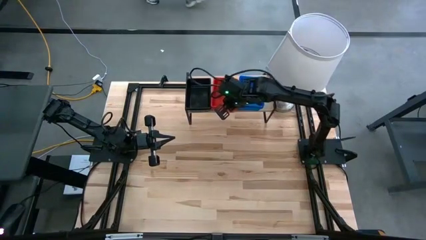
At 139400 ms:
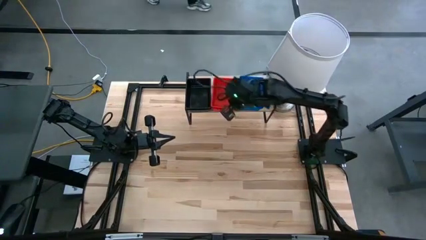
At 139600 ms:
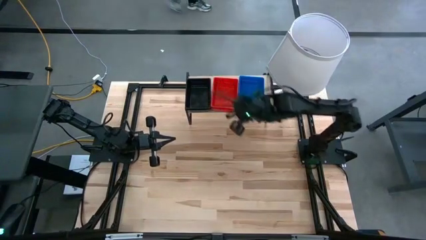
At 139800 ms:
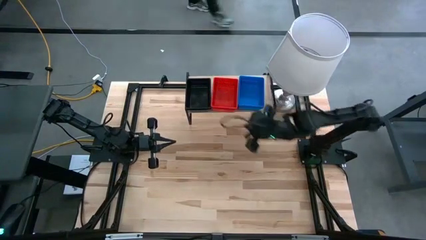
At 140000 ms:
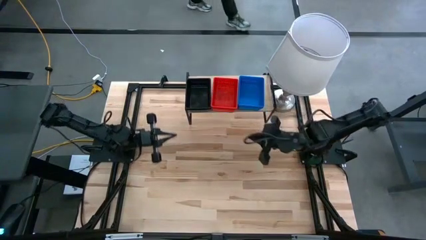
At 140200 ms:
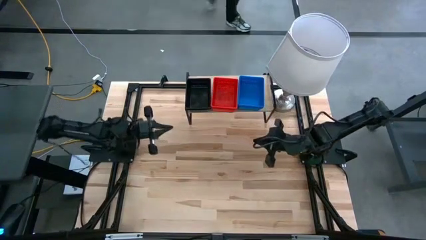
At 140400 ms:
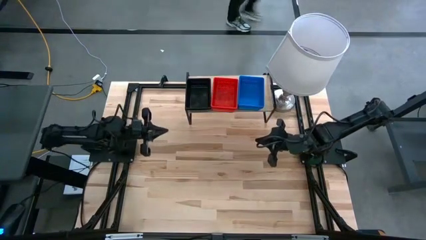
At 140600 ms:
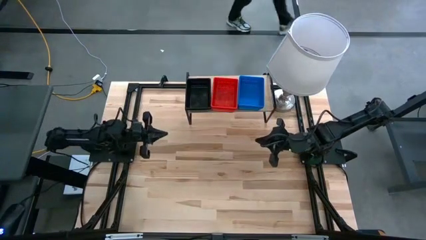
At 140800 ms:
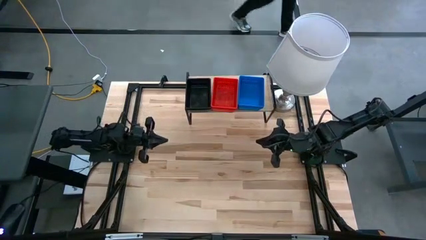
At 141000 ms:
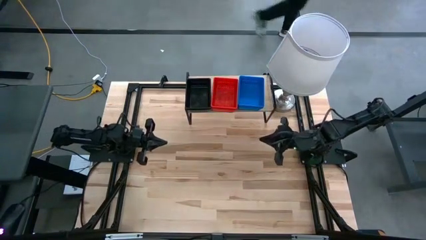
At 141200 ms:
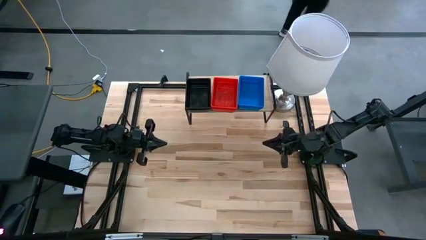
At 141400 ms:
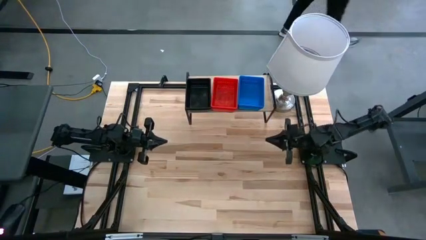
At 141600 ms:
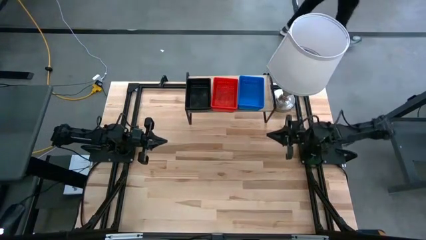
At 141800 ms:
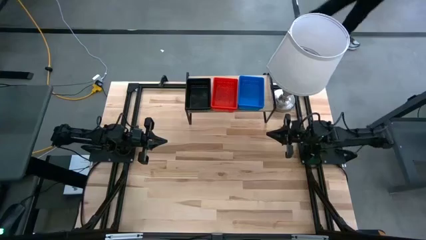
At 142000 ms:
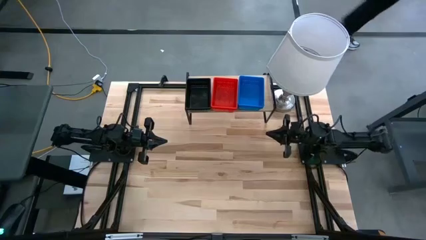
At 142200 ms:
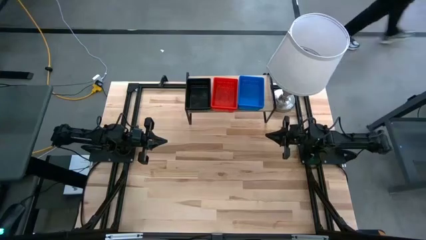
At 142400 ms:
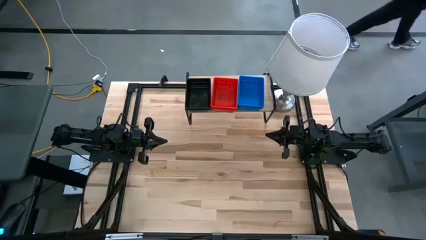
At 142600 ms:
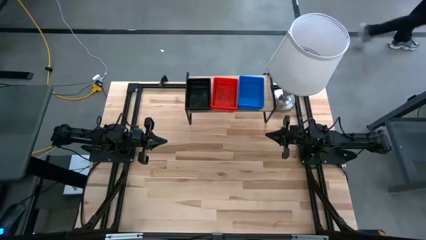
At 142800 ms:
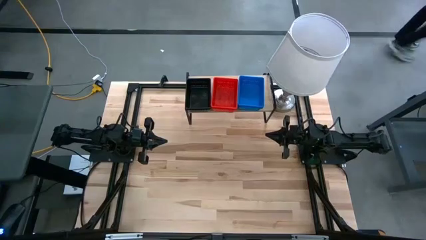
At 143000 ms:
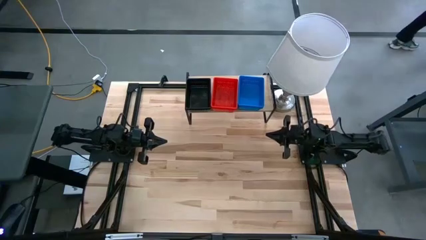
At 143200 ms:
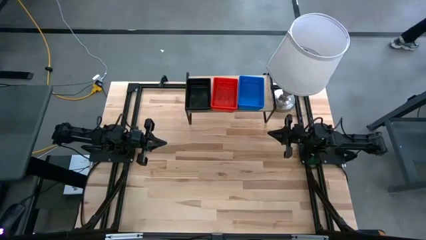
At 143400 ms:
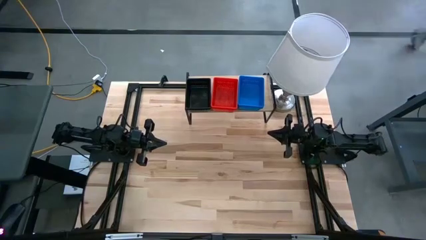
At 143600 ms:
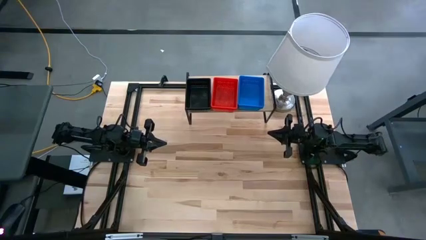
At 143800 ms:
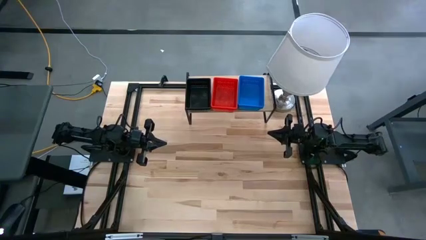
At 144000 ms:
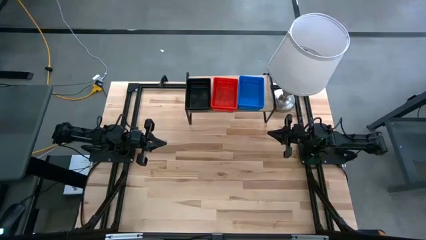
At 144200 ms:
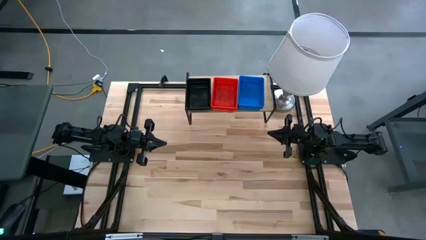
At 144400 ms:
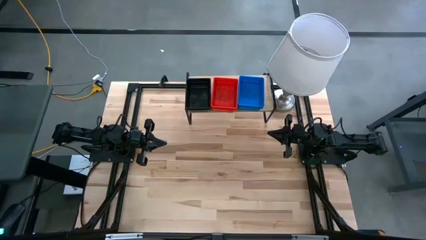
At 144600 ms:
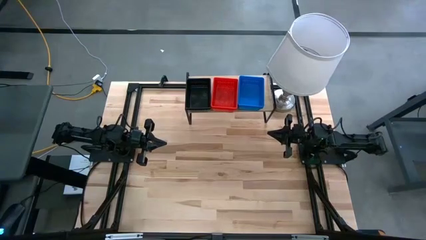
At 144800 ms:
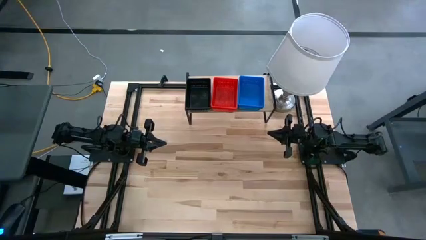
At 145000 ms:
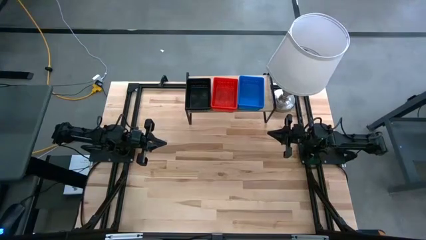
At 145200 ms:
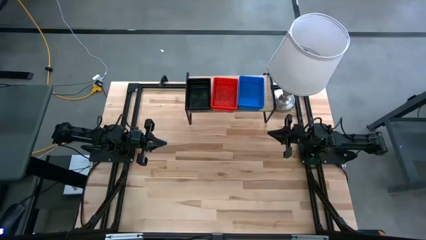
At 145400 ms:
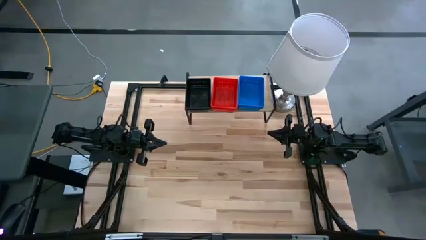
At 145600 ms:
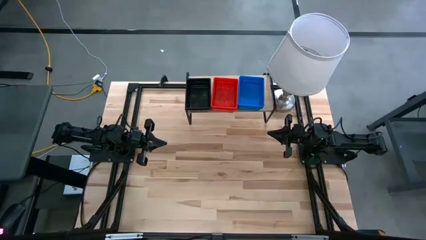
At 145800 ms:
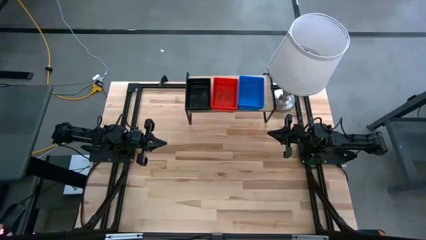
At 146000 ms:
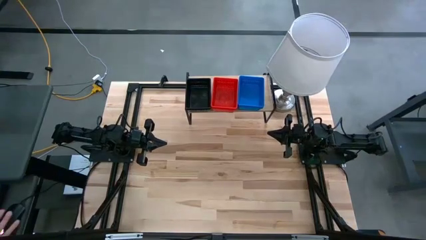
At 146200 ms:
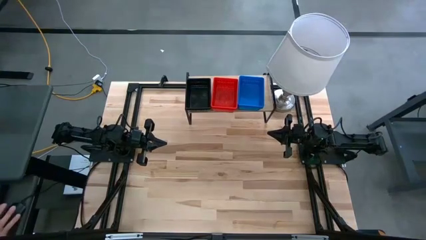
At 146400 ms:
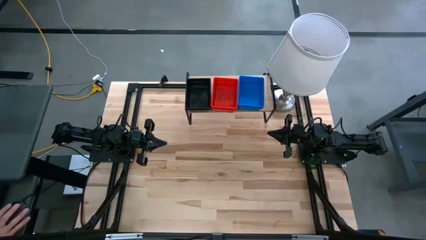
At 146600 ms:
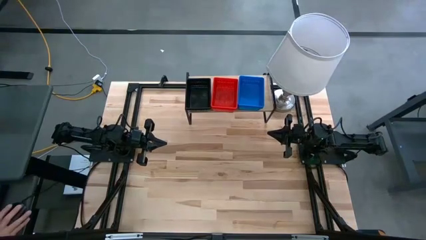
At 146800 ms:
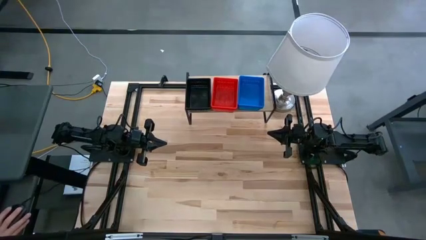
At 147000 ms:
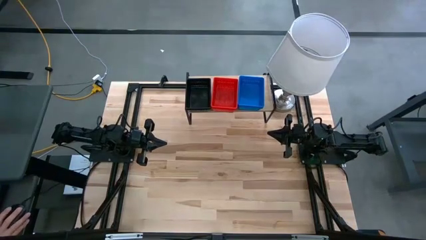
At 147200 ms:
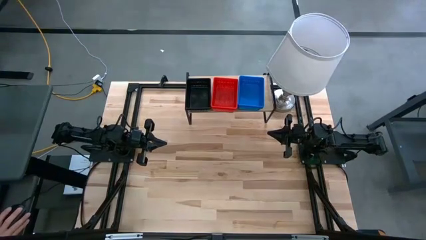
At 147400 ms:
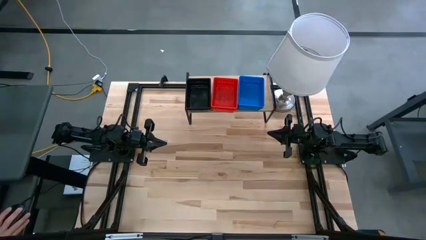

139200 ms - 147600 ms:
Task: Stack baskets on shelf by color
Return to Home Position

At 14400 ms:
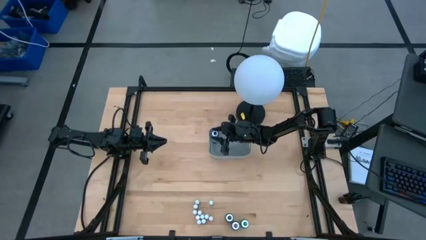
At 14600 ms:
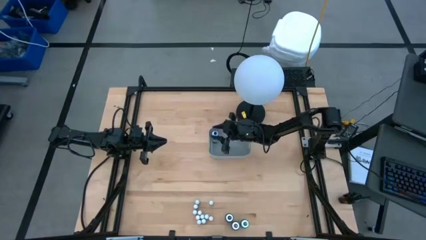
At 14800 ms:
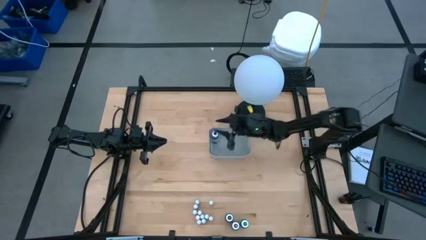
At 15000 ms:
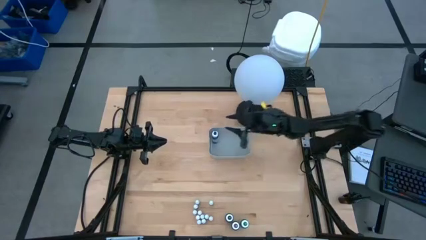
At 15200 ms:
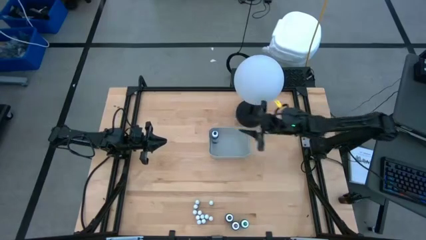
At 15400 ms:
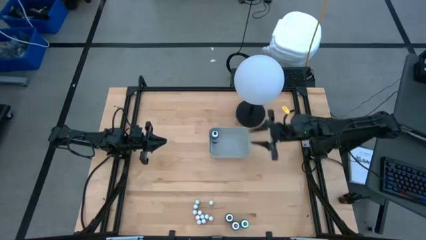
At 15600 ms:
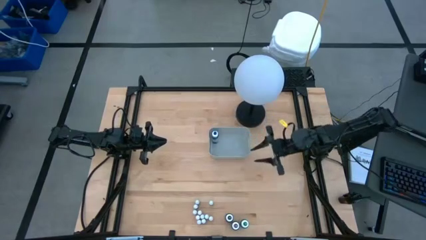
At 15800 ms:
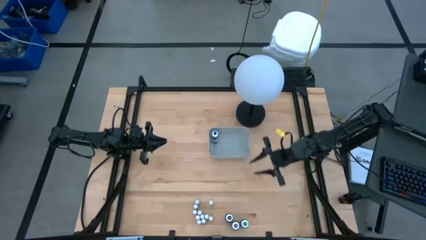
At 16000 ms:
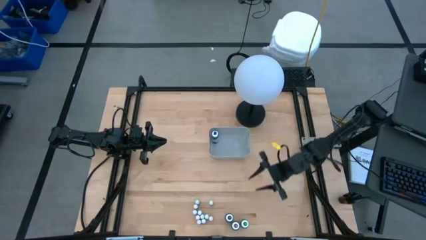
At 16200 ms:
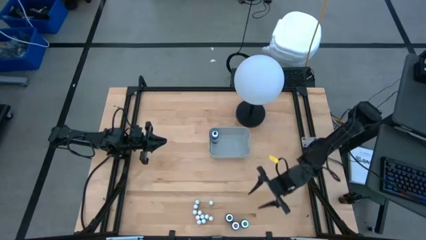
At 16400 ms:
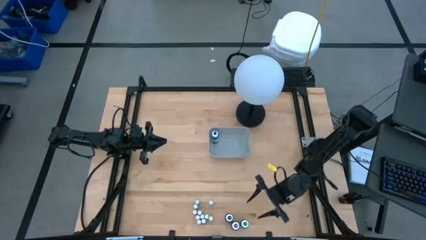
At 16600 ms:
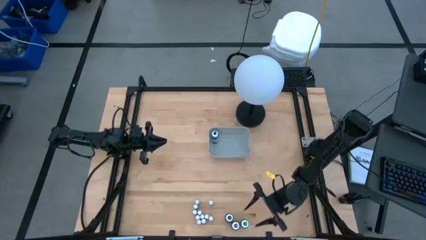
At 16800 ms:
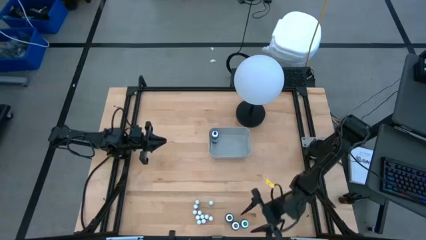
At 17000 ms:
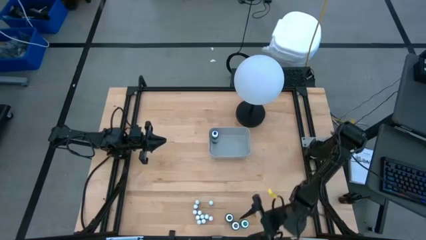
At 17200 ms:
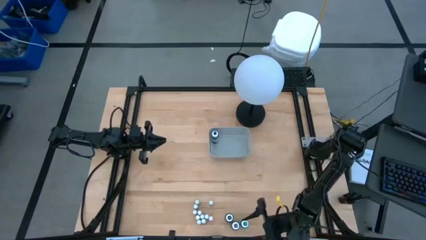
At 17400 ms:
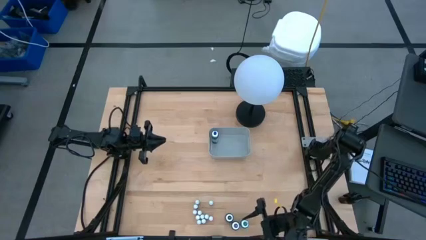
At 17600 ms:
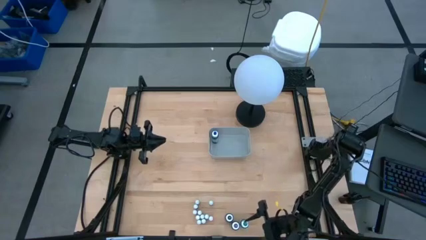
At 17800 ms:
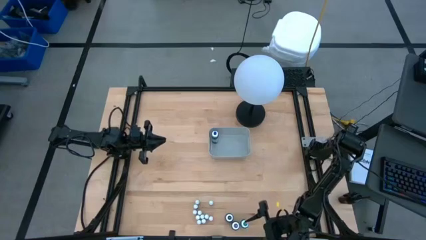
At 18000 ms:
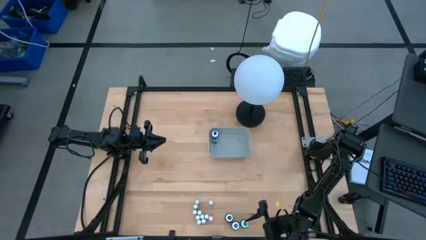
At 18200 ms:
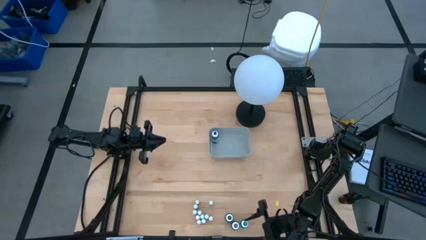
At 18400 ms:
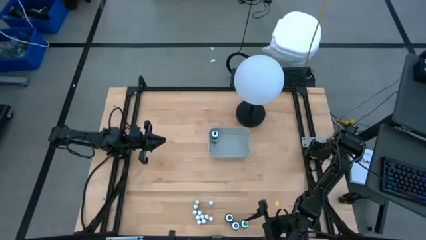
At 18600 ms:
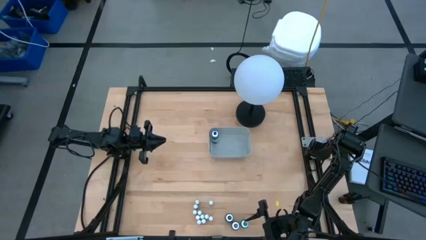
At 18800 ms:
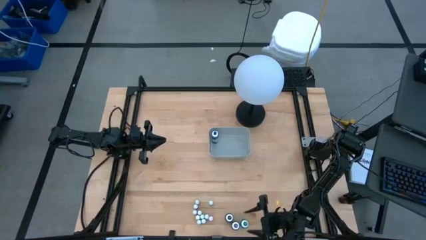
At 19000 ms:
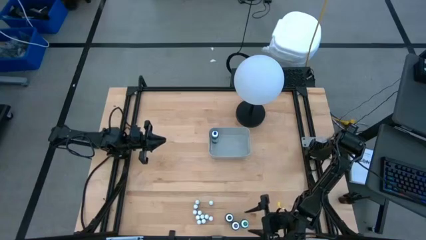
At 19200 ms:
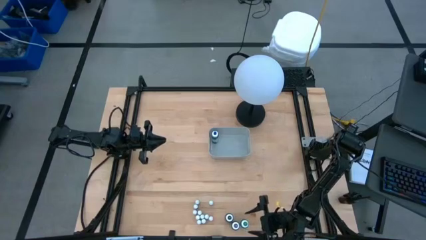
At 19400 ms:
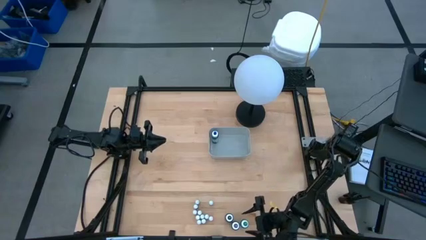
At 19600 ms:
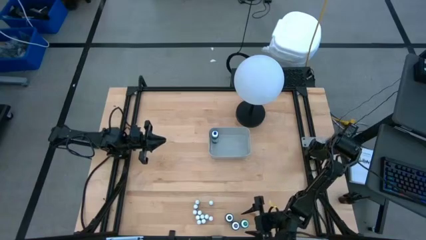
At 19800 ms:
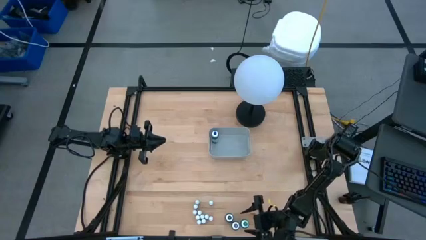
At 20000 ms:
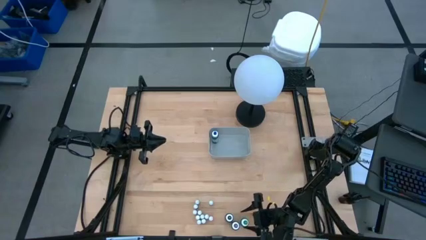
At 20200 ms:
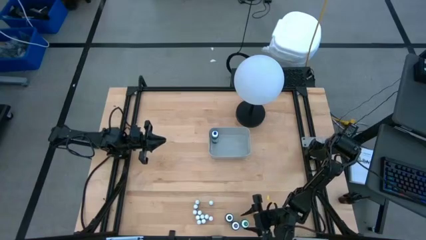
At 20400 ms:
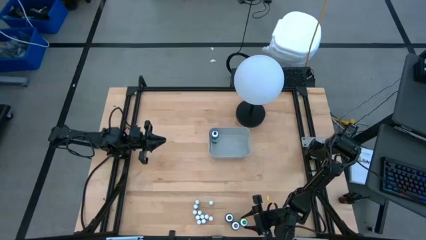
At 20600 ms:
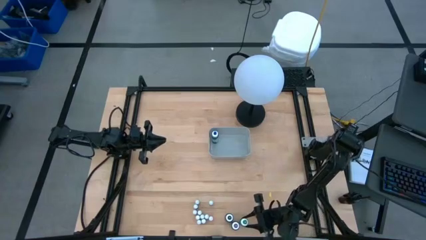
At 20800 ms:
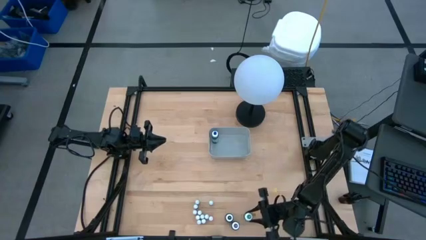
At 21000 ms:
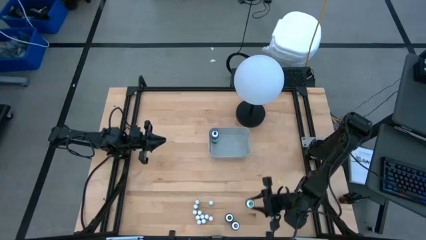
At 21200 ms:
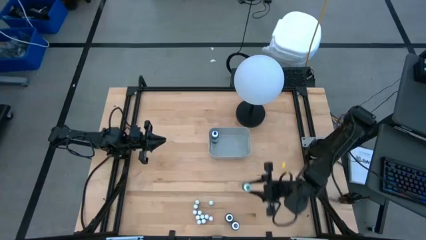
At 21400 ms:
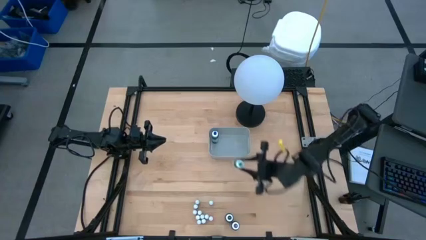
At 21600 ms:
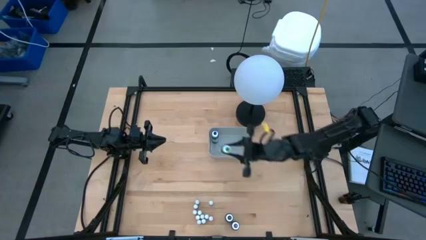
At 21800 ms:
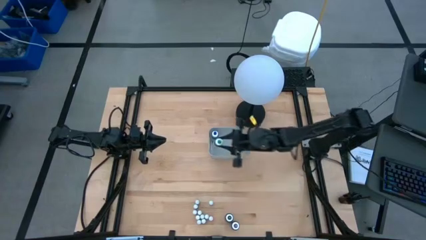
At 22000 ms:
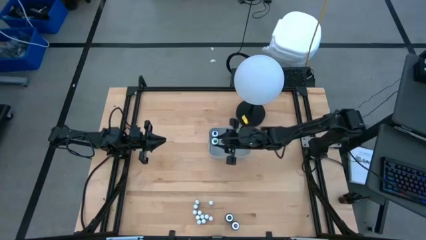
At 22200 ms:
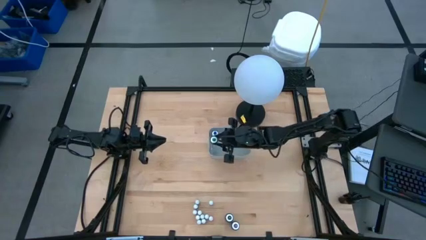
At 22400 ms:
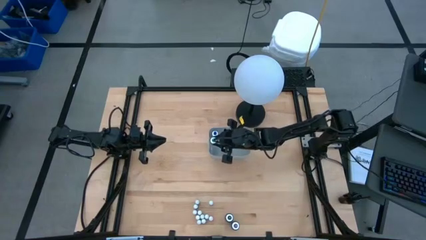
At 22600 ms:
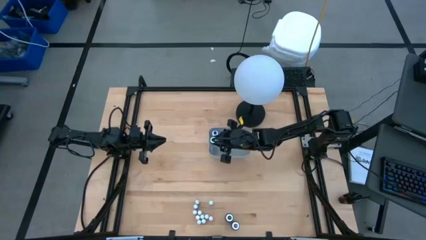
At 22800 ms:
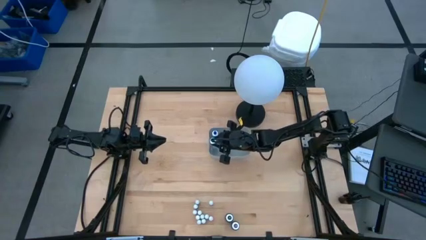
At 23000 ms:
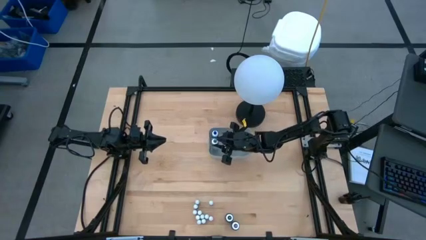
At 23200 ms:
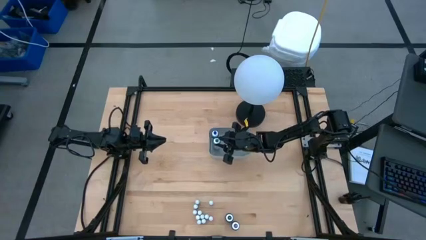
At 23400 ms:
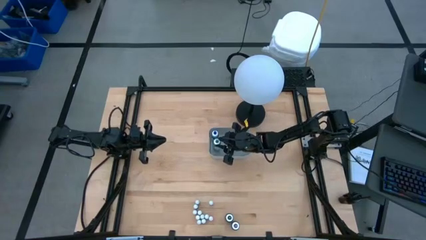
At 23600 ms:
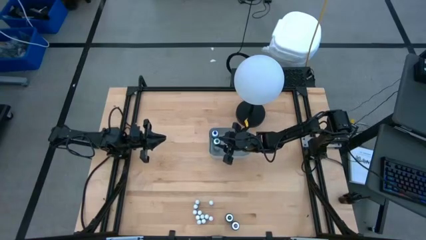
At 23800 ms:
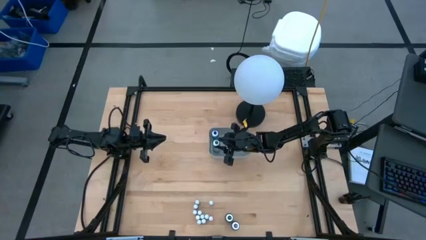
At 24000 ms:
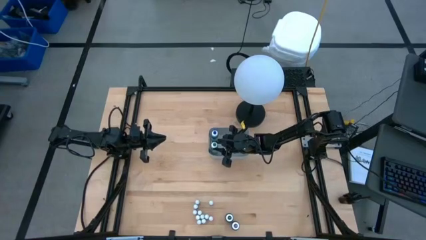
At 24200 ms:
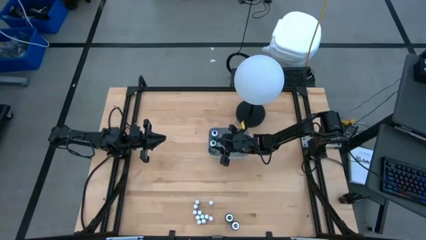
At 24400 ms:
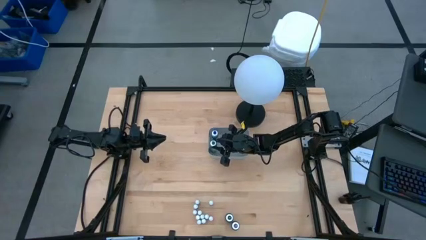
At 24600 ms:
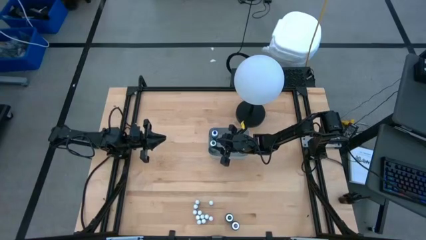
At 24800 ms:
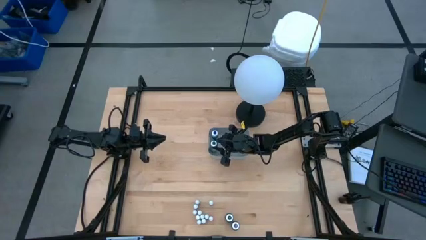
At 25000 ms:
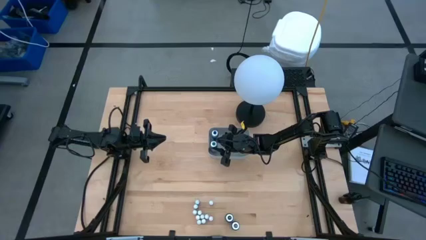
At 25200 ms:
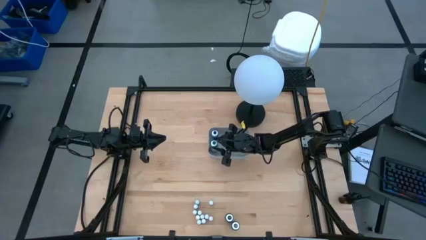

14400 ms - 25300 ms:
Task: Pick & Place food coloring
Put the green food coloring bottle into the gray bin
